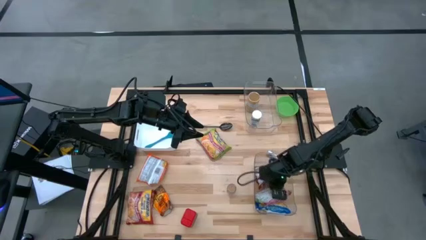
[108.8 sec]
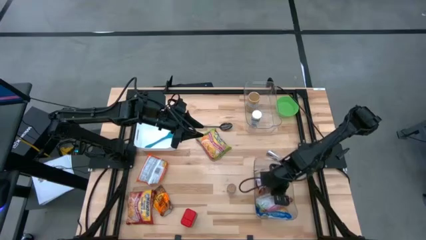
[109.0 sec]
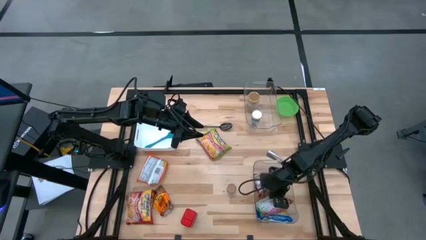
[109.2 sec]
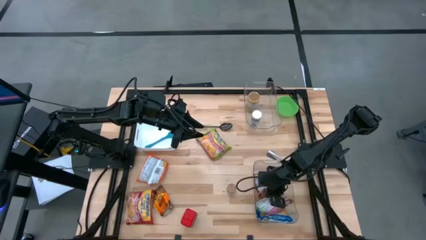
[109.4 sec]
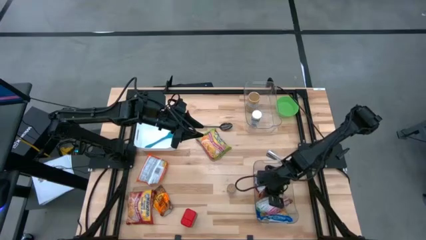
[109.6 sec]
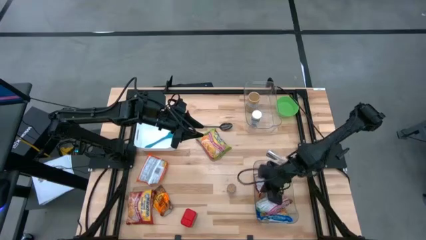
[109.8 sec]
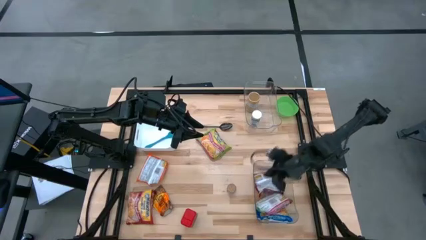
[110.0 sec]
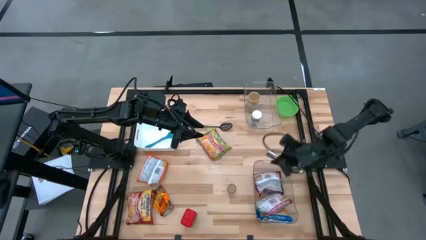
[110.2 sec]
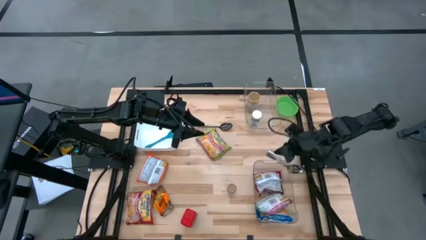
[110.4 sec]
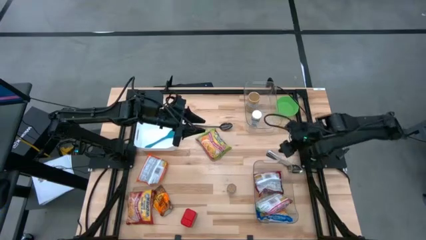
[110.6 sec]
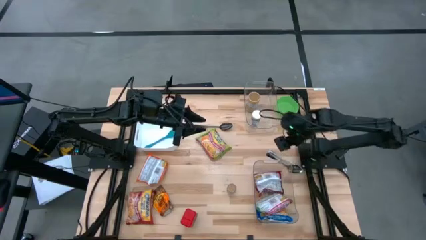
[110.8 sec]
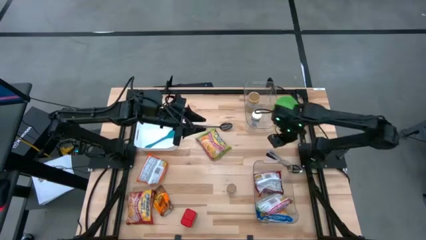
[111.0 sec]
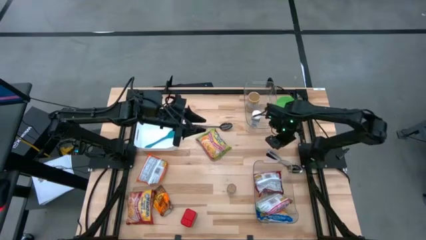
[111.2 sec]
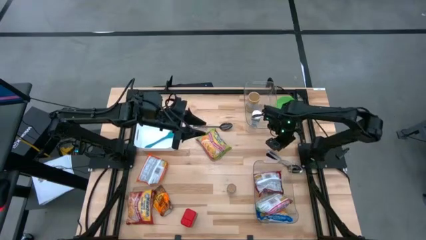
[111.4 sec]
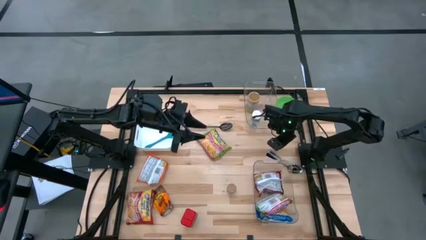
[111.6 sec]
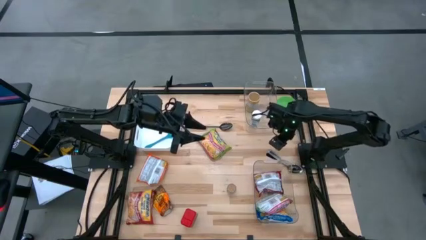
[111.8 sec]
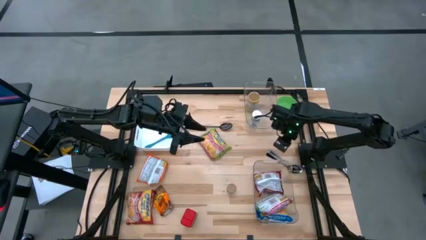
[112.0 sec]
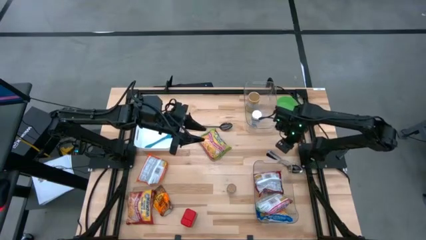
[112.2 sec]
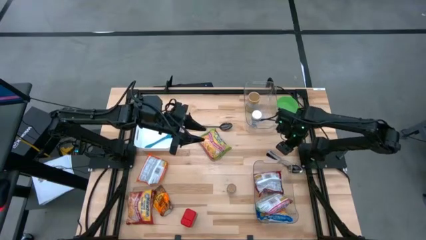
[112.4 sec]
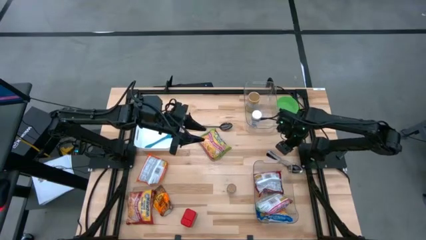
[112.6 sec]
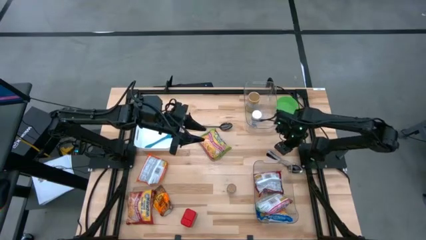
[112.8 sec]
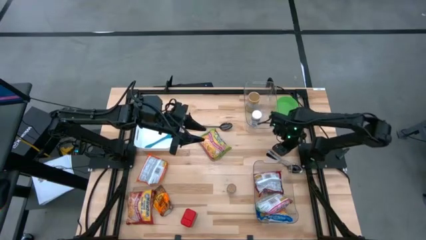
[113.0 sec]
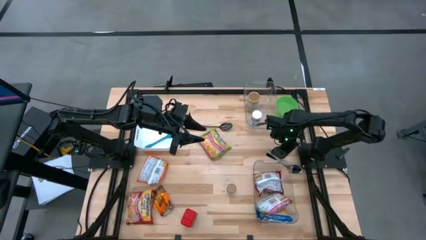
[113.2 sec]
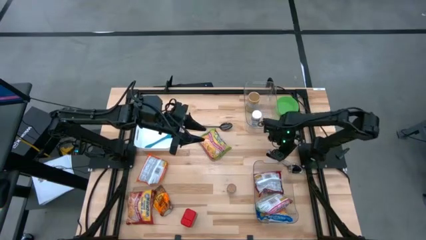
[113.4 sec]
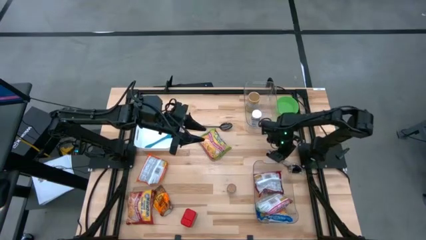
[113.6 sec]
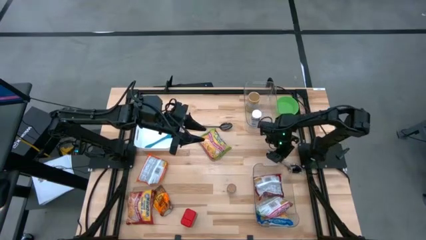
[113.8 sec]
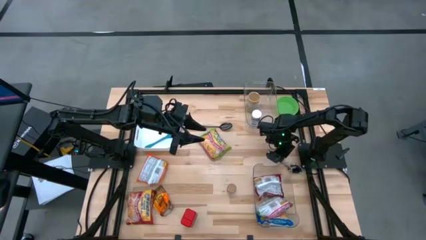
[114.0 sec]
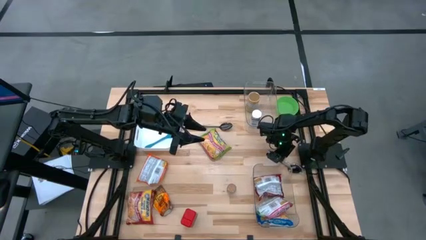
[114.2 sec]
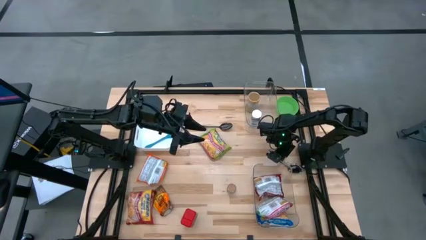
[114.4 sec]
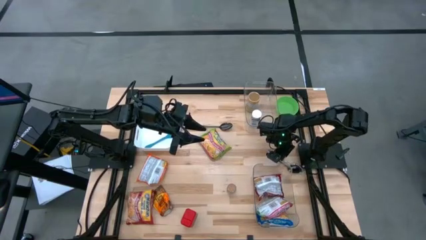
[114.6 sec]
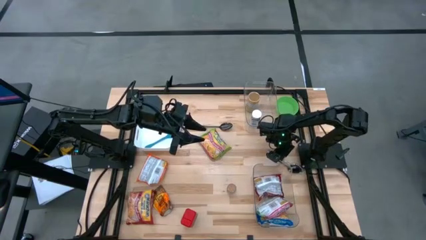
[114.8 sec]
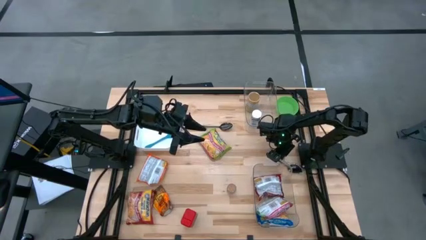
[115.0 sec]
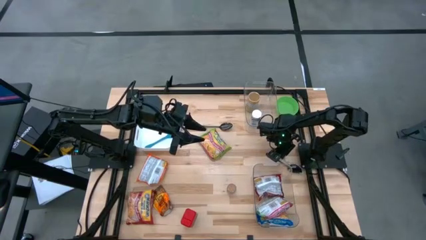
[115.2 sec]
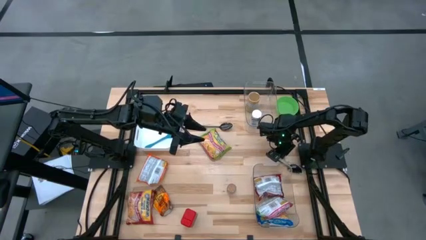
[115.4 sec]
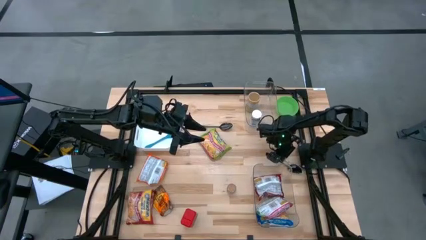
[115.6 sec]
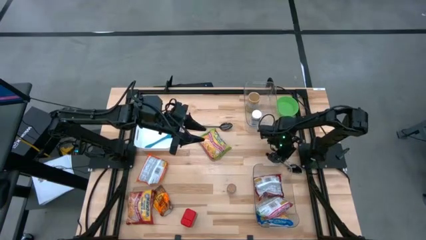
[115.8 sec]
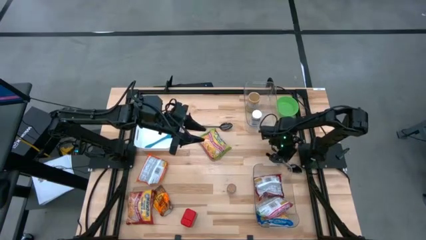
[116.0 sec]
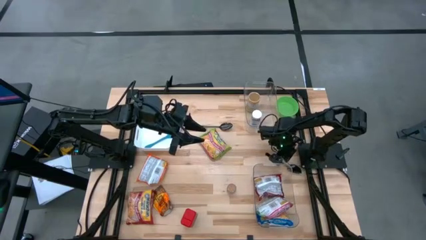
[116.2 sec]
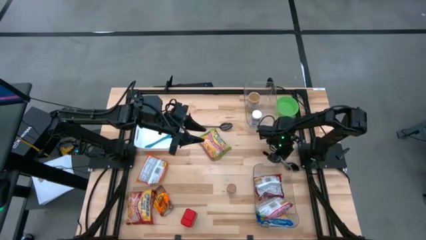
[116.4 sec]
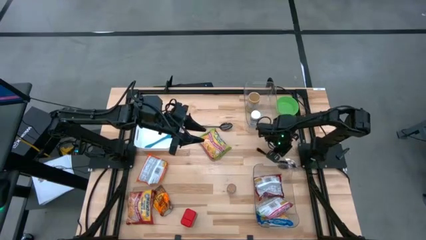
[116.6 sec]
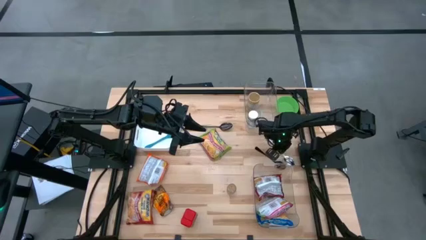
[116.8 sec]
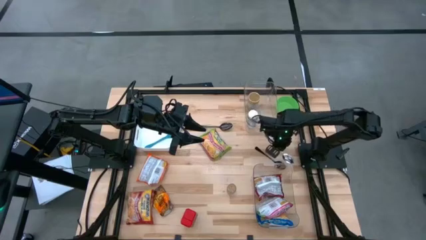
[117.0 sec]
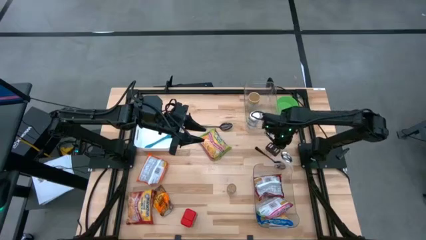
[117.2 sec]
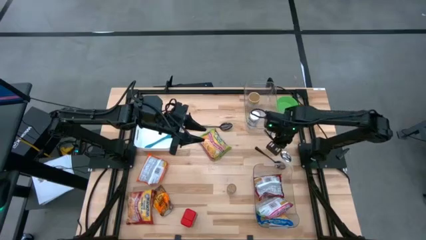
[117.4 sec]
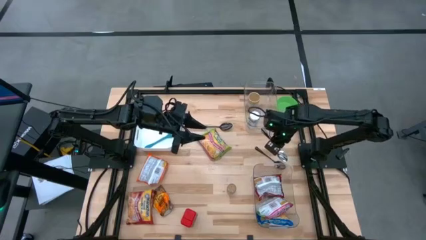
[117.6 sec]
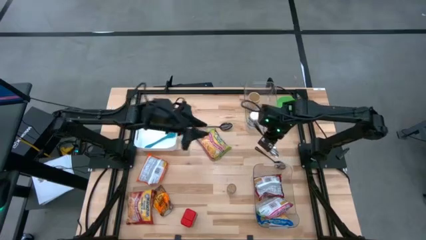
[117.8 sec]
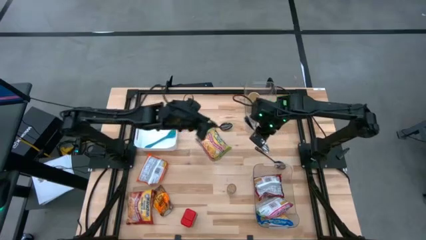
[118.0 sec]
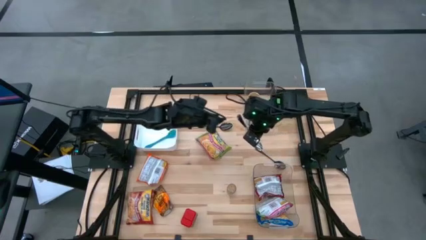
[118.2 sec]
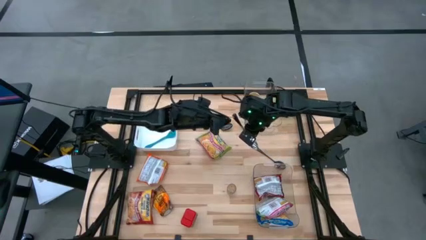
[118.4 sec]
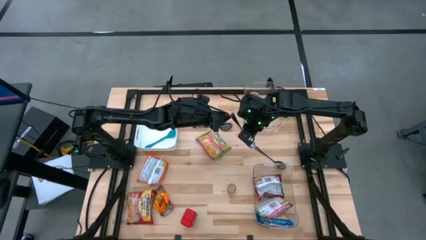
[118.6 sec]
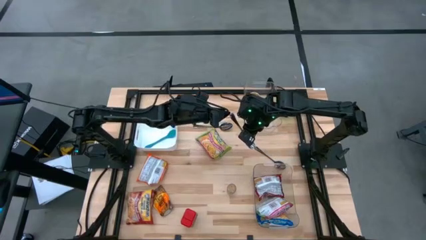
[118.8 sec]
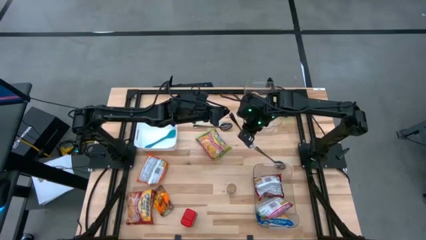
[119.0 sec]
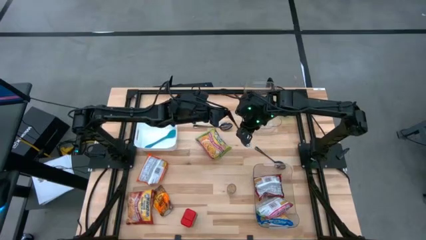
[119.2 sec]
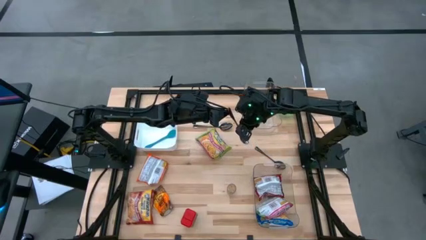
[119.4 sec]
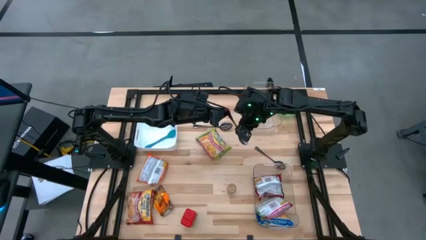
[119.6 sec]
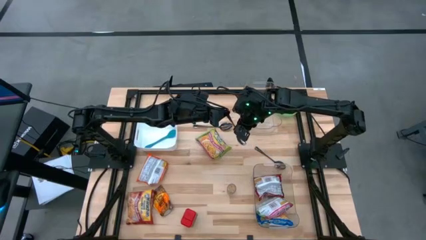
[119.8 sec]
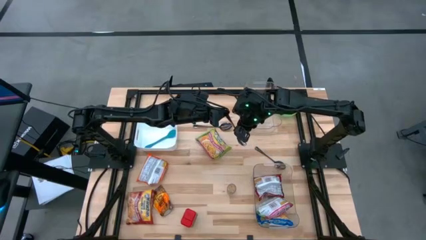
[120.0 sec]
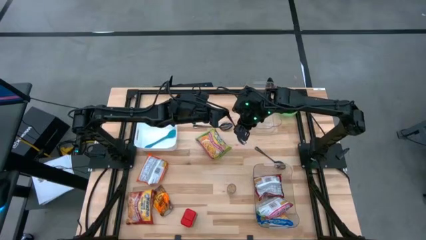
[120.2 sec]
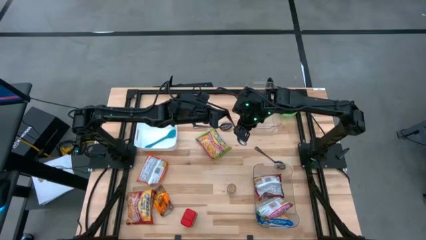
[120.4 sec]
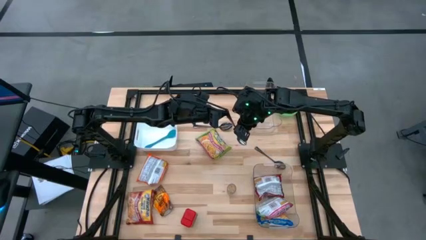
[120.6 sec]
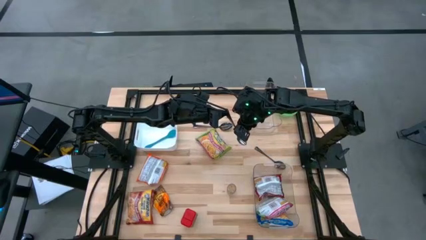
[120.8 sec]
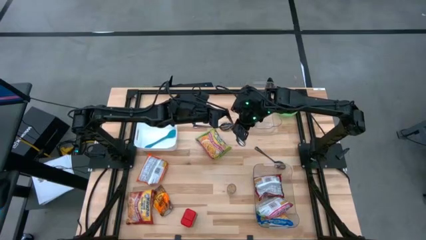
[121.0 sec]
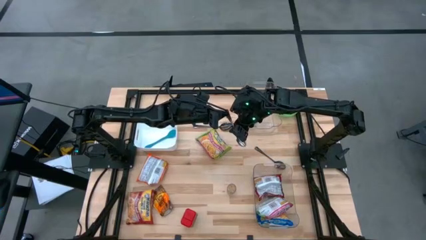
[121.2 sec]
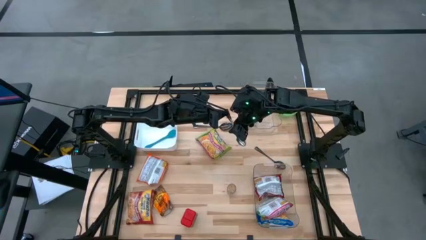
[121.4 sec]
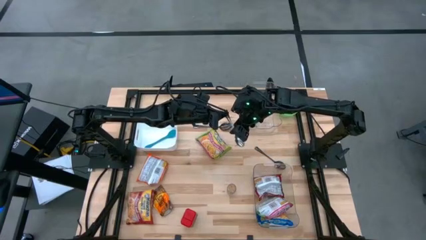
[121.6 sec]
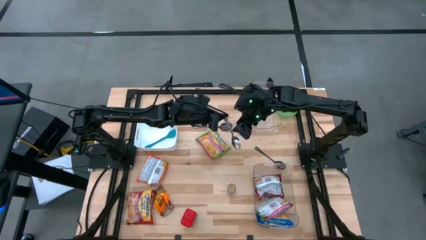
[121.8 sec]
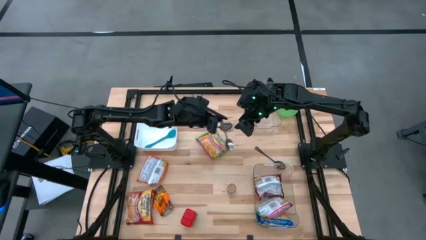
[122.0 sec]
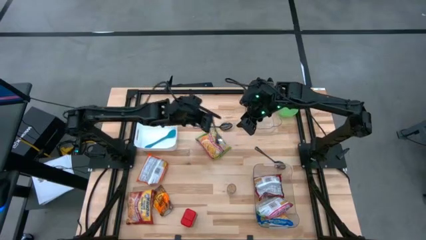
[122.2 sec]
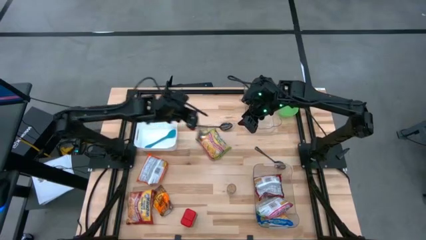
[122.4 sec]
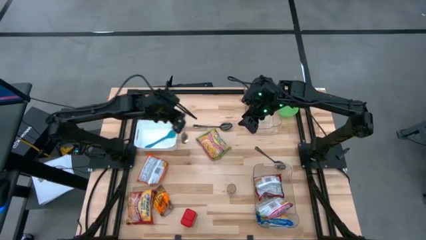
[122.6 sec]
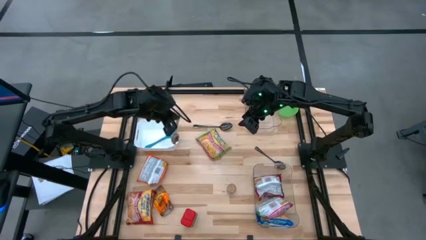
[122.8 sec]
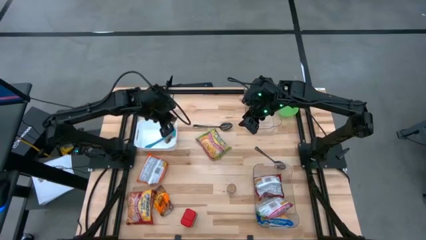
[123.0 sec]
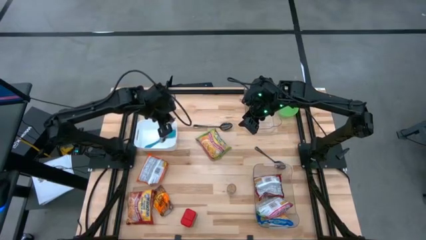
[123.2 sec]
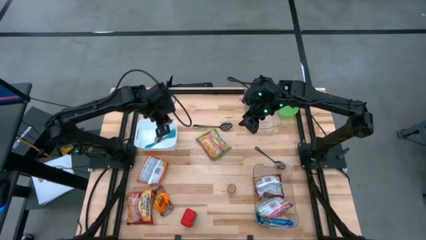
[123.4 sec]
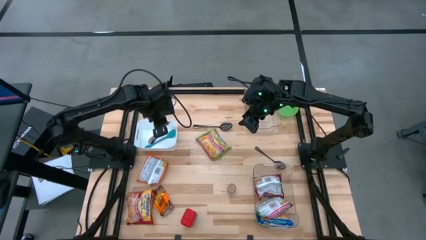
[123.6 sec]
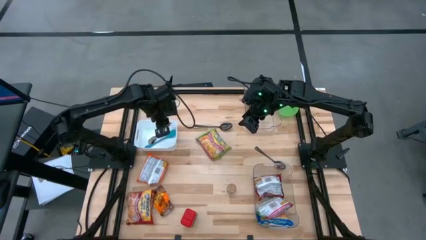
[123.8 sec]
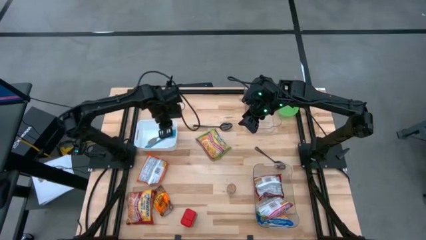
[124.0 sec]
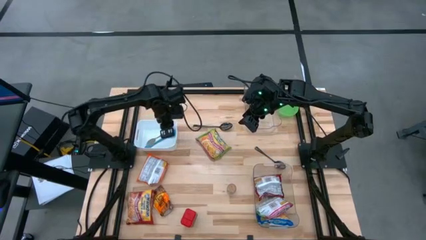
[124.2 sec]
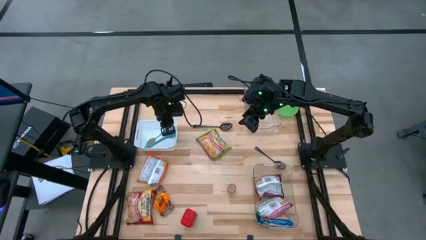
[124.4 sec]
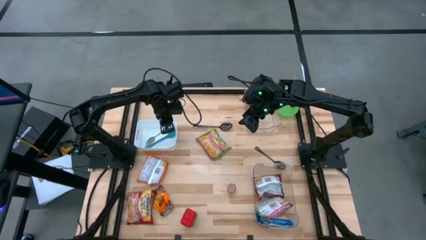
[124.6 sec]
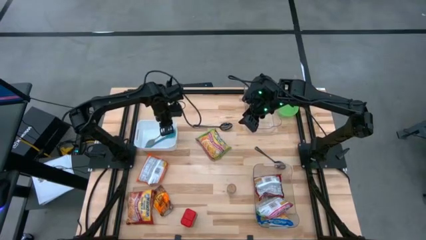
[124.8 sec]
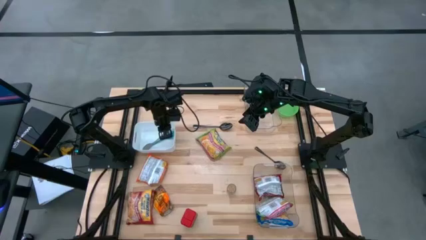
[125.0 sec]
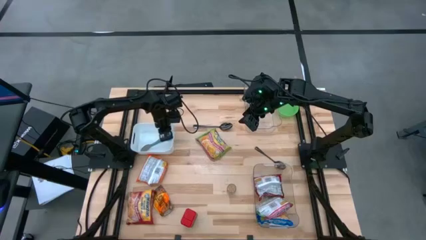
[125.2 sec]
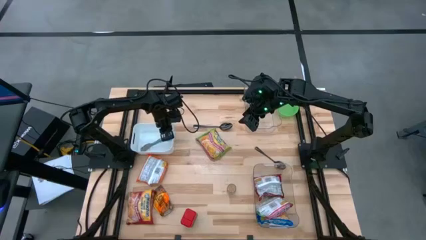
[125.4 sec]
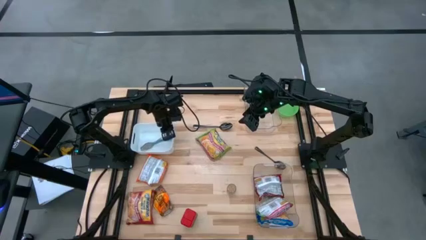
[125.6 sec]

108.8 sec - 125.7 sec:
Task: Pick & Place Food Item
Put the silver spoon into the white bin
